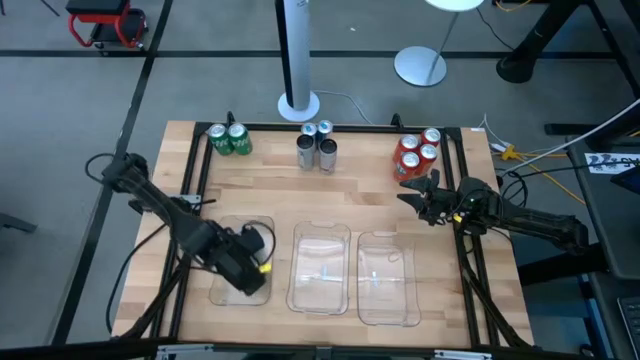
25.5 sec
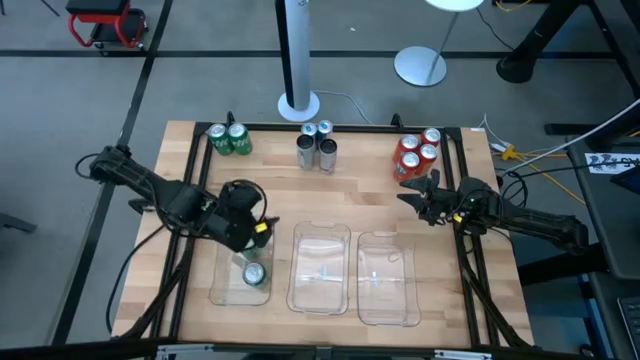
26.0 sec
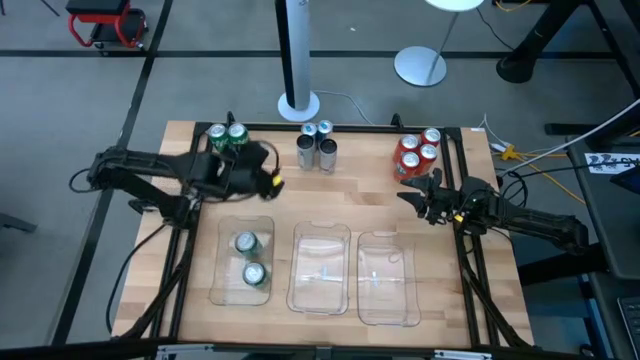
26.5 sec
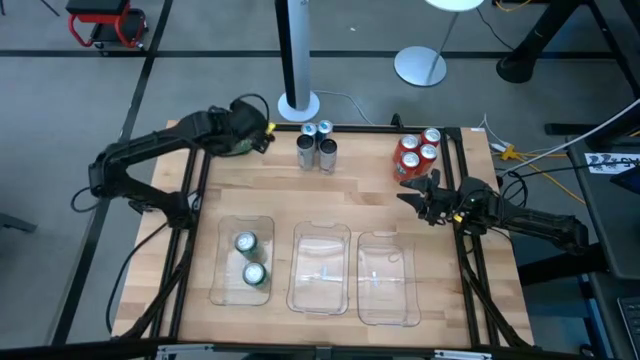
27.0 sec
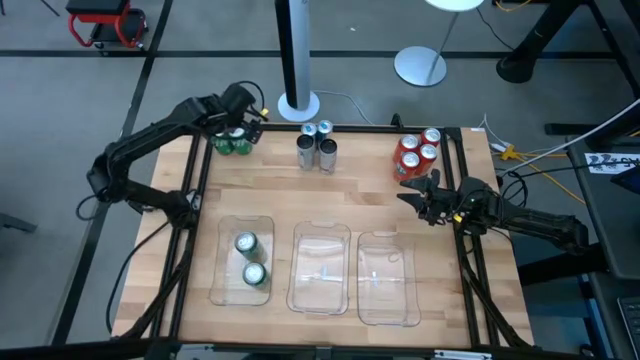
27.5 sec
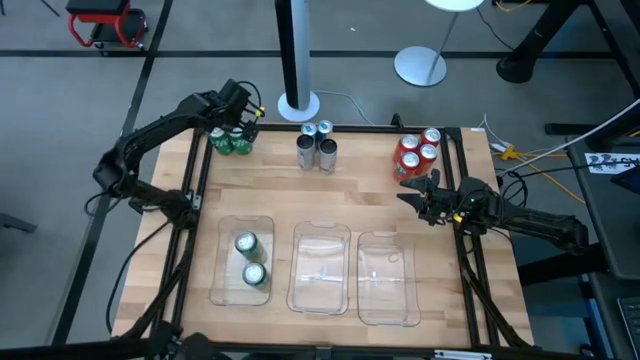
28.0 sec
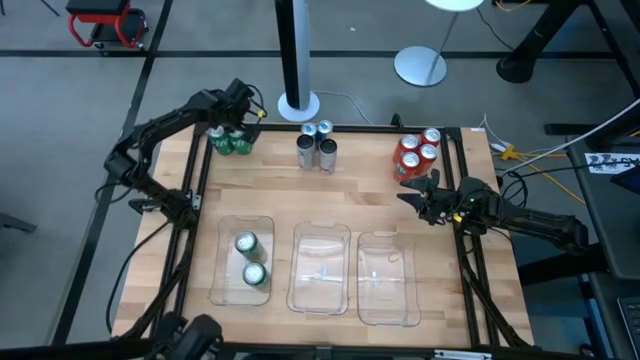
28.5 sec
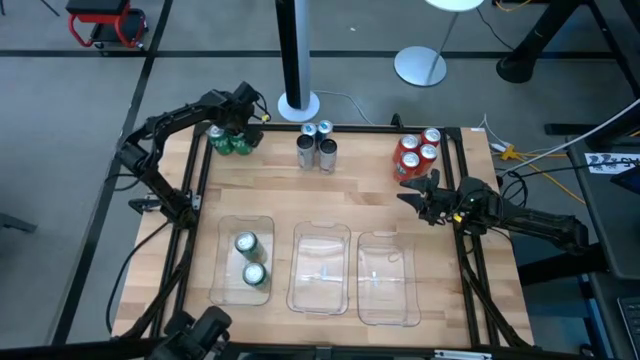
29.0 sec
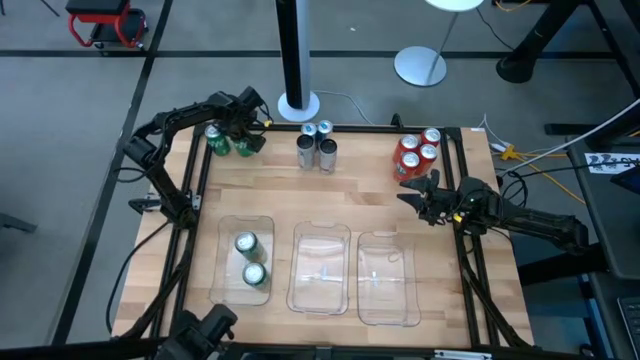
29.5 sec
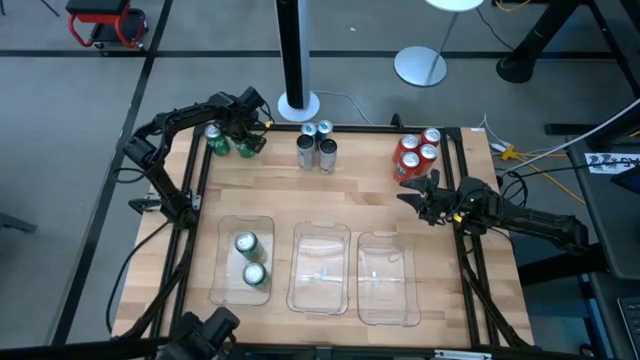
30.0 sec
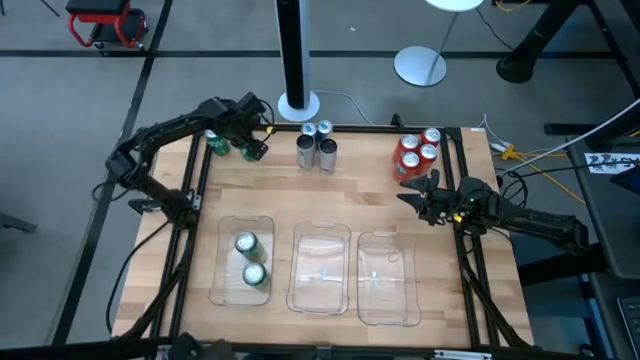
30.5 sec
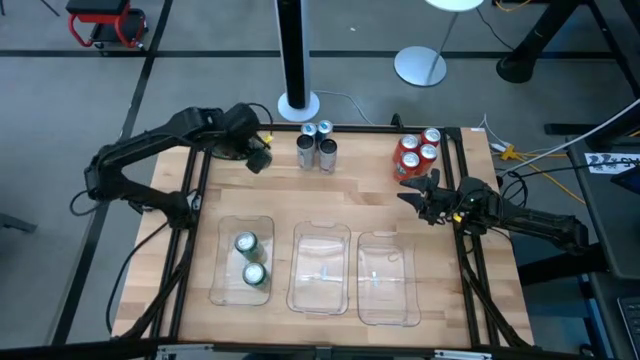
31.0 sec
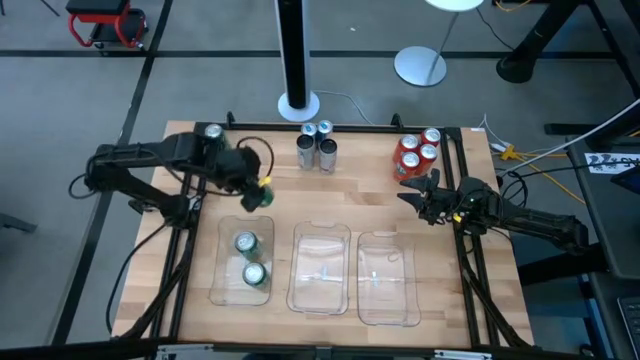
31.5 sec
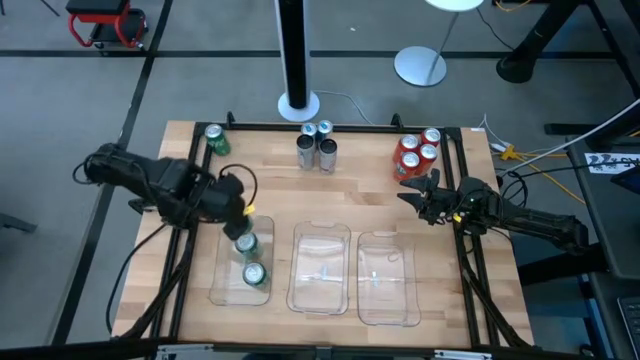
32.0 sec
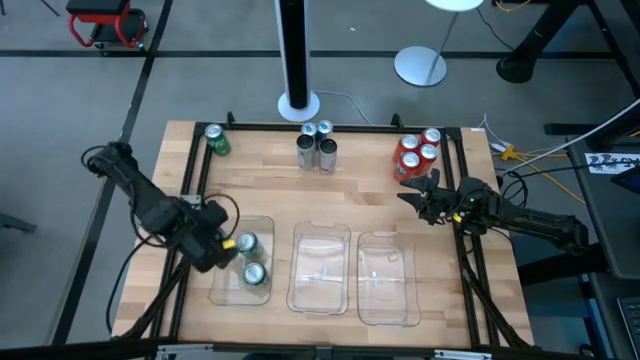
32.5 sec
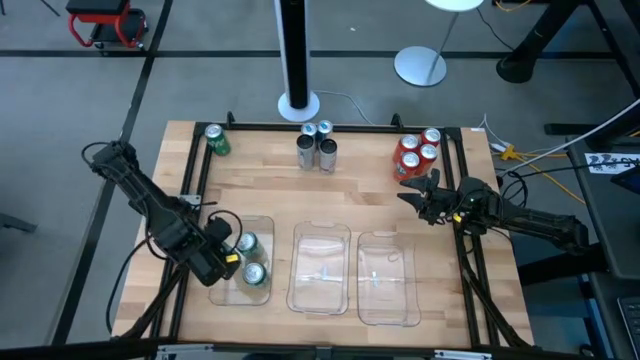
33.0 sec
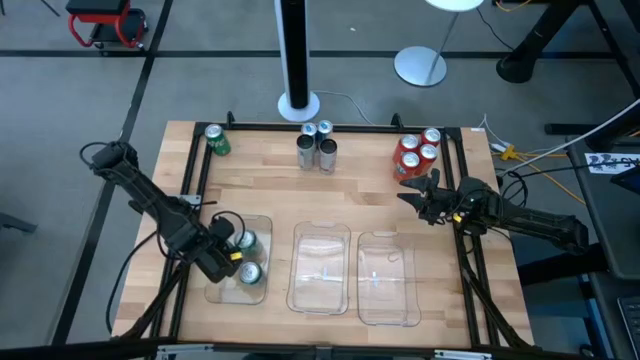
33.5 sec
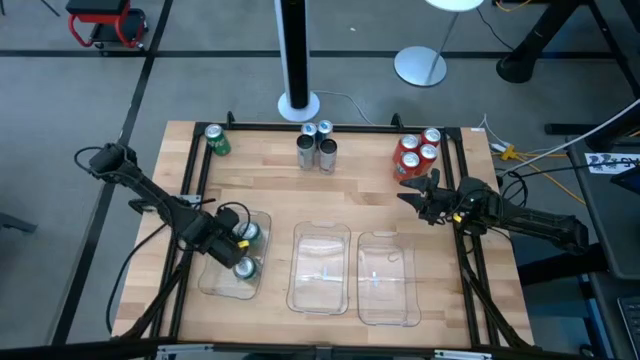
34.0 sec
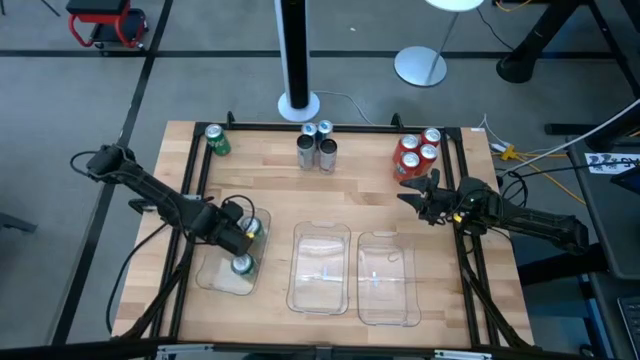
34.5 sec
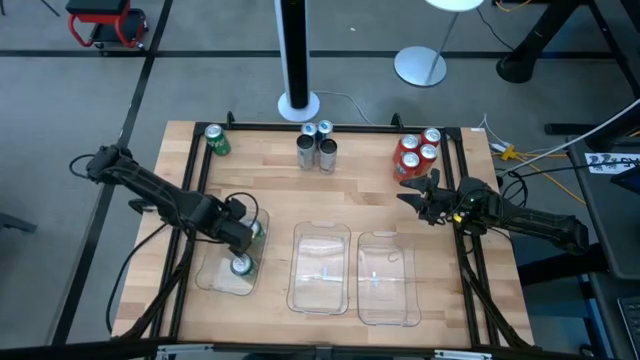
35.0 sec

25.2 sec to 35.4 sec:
Task: Sort soda cans
Put the right green soda can into the left transparent bin

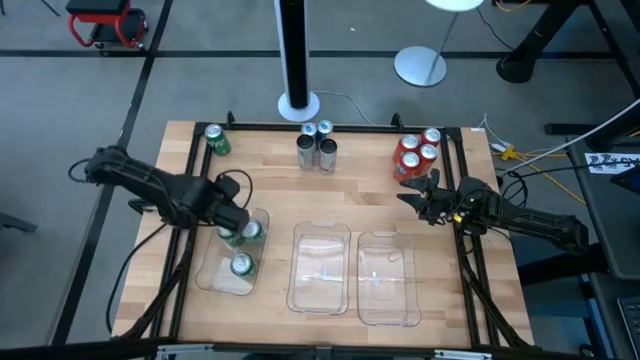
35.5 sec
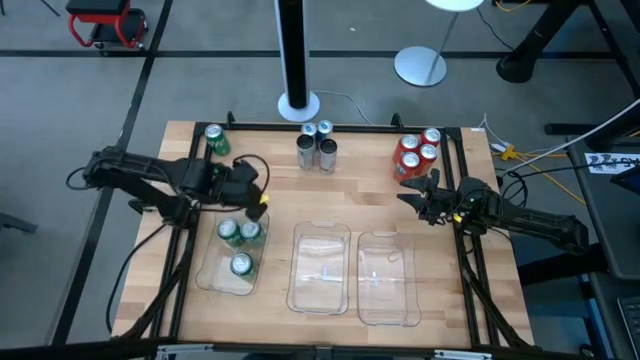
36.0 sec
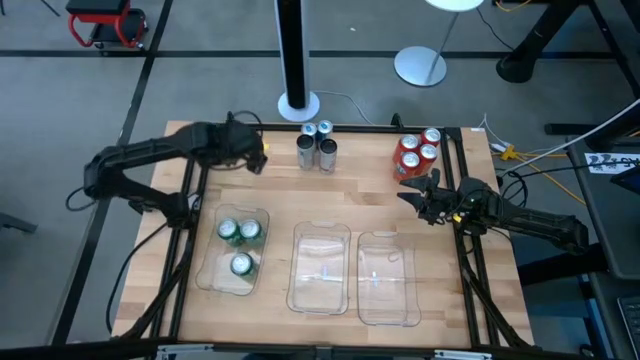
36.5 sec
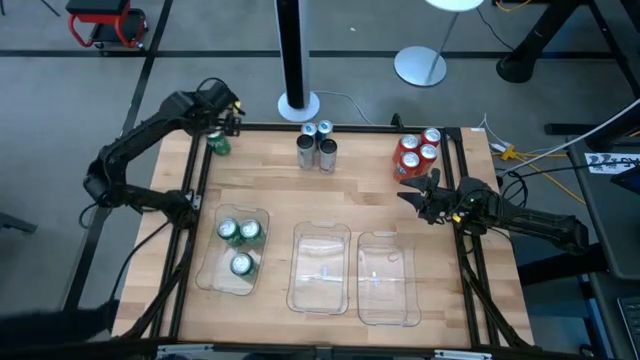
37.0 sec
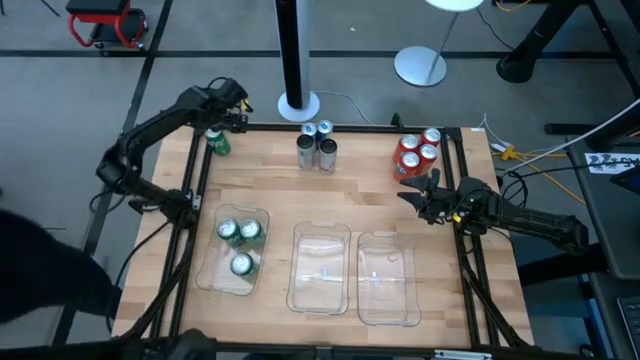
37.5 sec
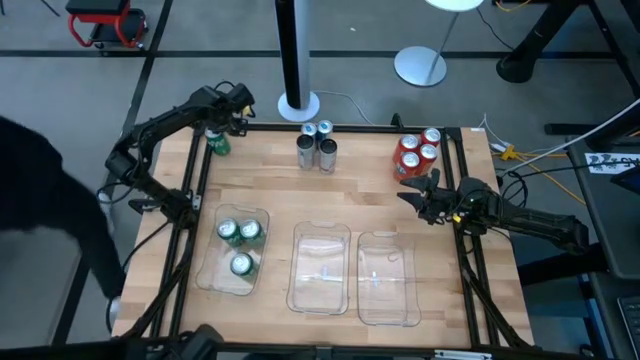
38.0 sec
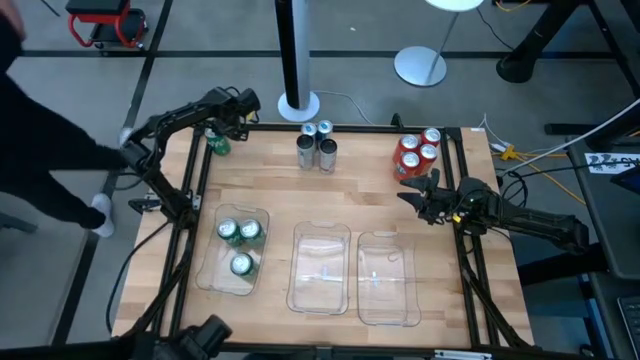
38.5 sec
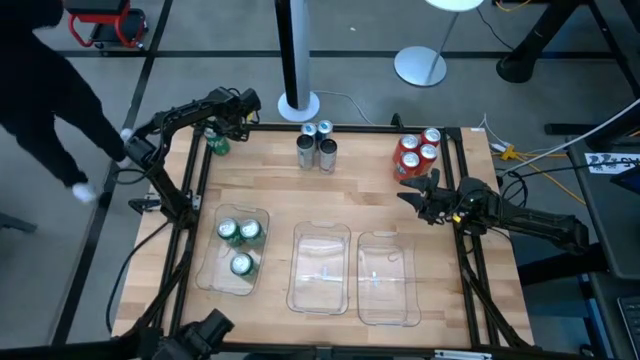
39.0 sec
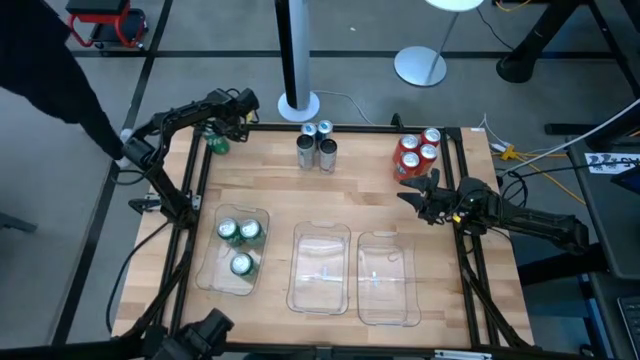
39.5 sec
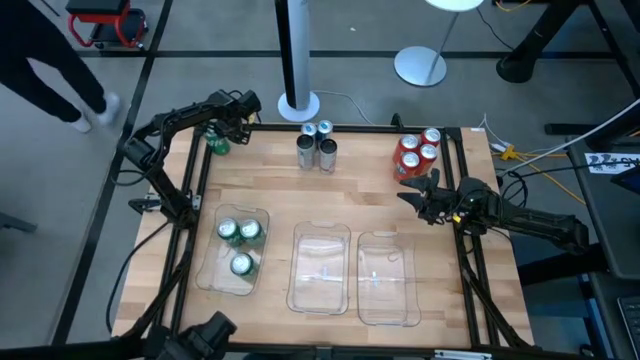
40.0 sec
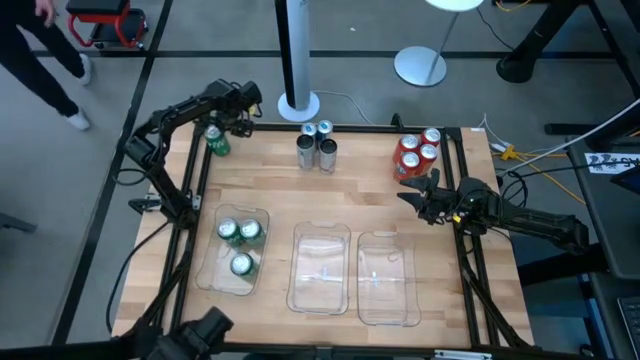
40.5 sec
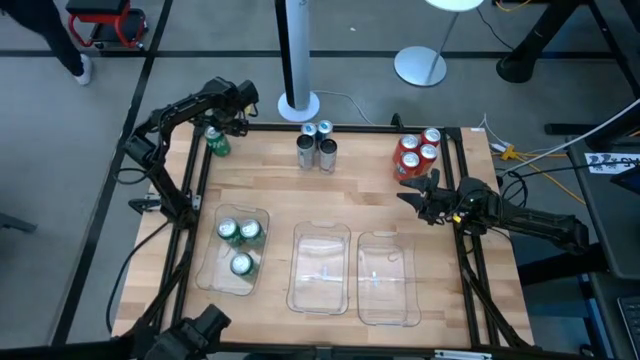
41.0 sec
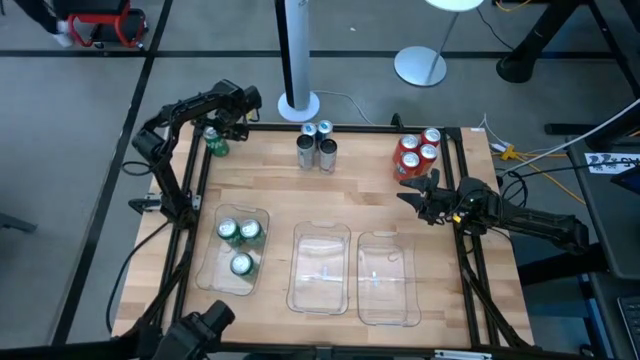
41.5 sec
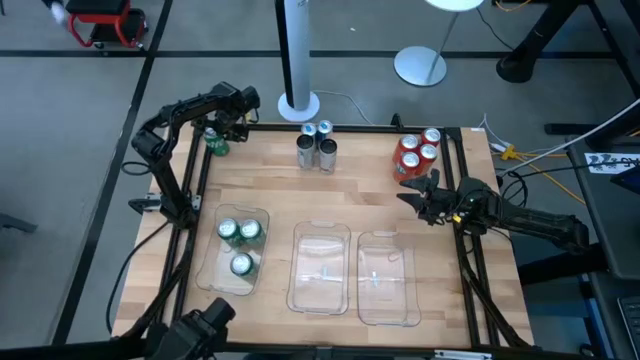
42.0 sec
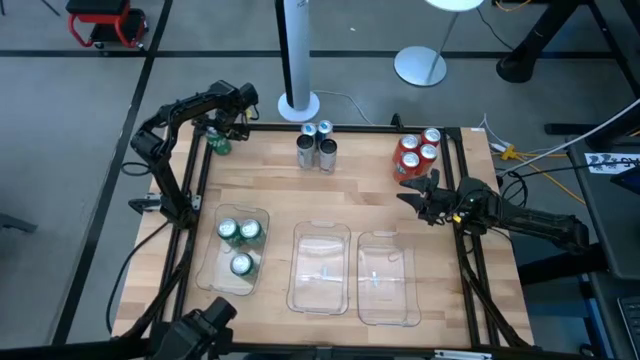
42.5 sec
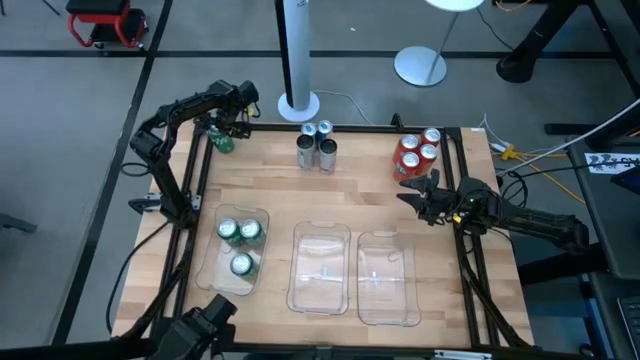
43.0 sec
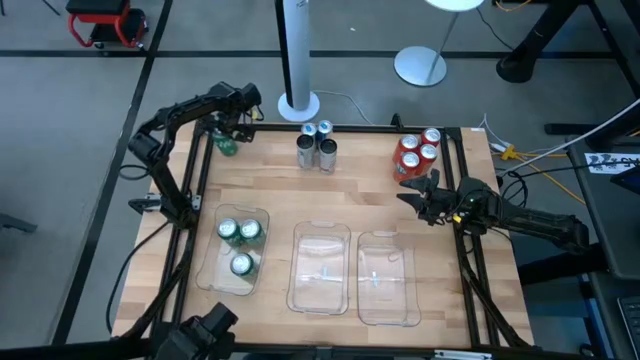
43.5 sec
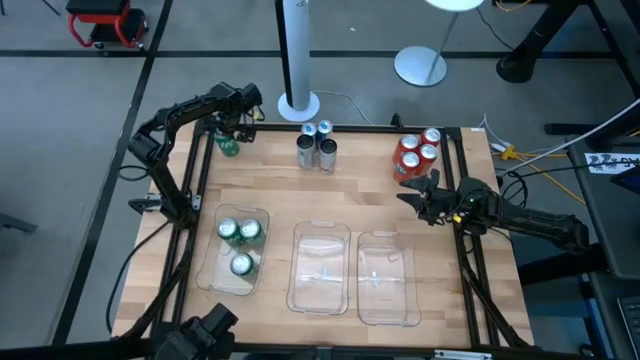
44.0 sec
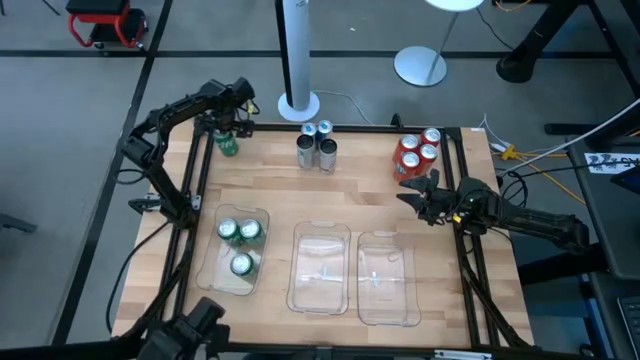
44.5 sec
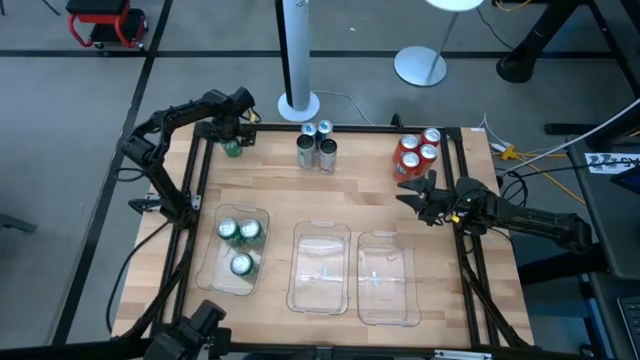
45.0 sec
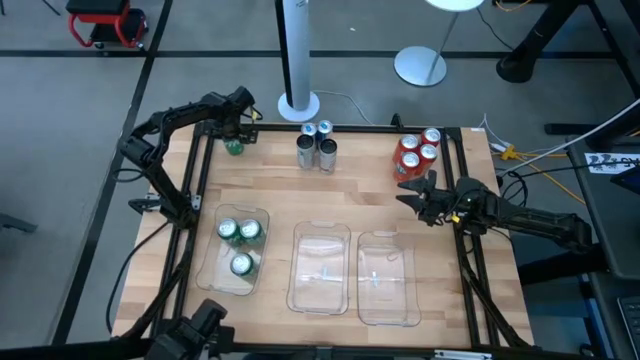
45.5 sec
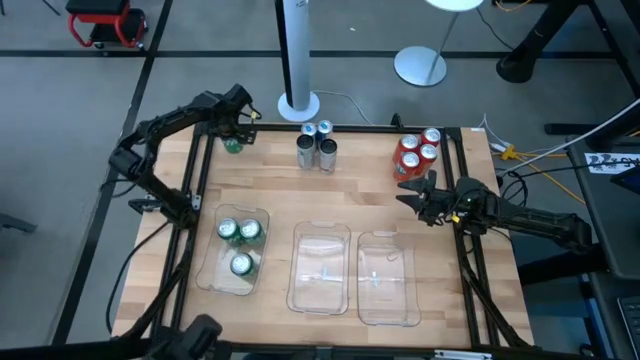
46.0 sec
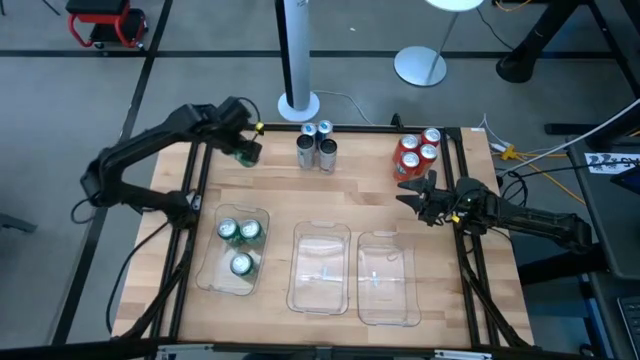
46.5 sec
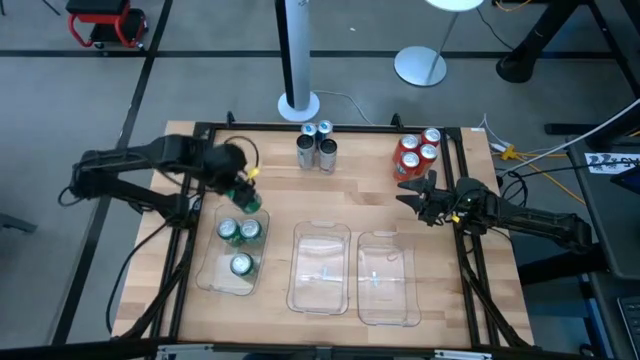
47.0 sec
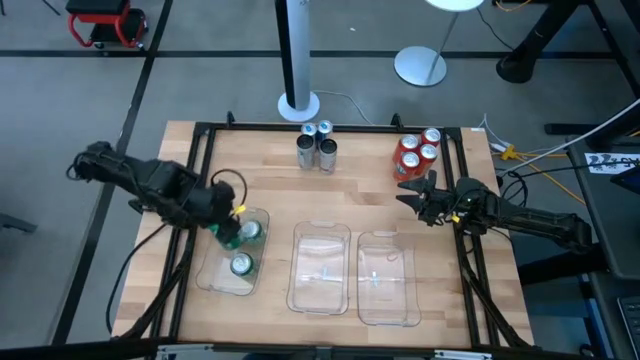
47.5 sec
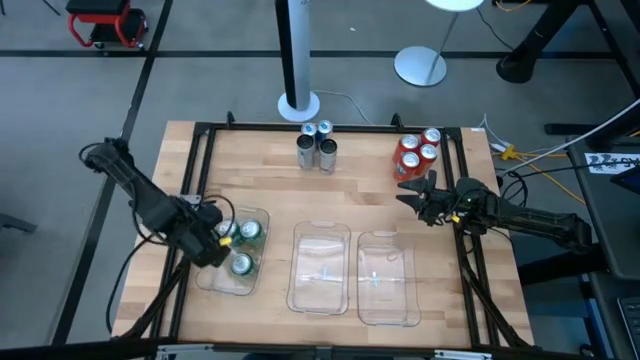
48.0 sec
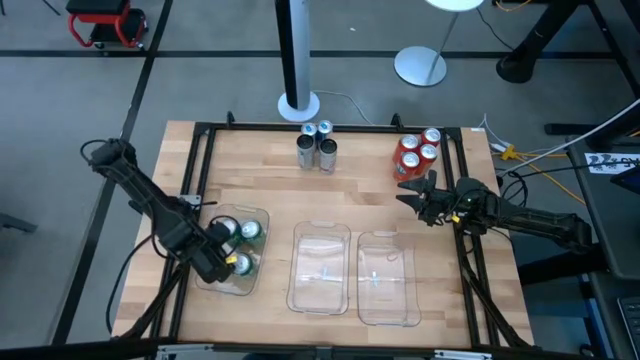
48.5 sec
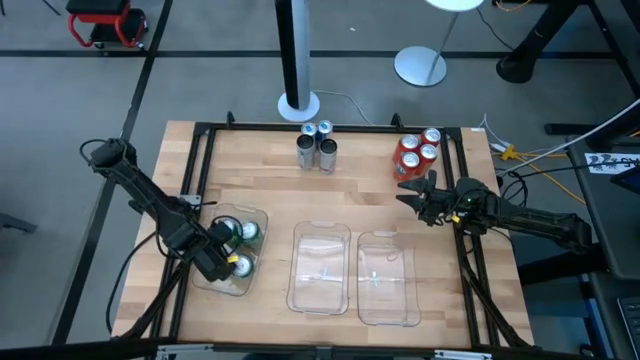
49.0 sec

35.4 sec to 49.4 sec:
Put the green soda can into the left transparent bin
